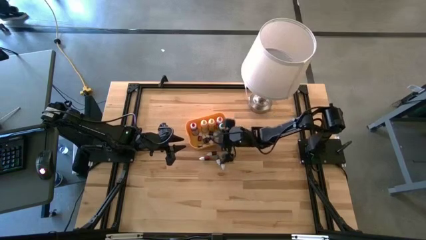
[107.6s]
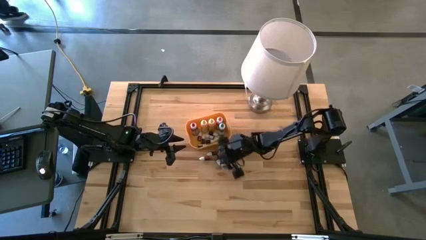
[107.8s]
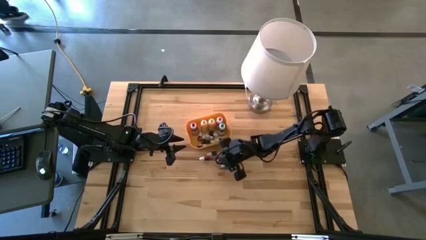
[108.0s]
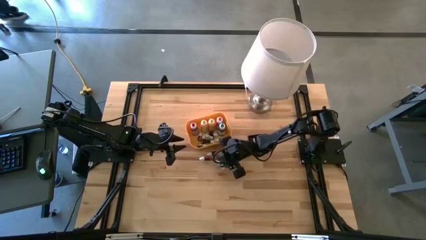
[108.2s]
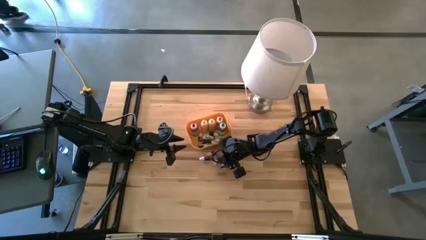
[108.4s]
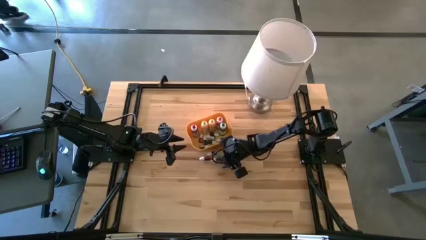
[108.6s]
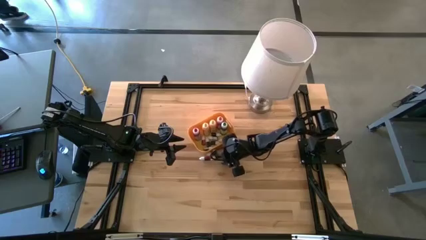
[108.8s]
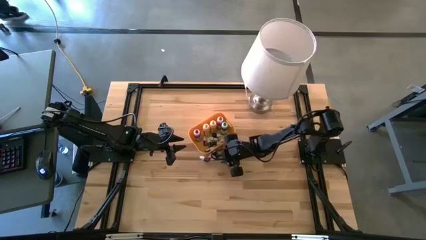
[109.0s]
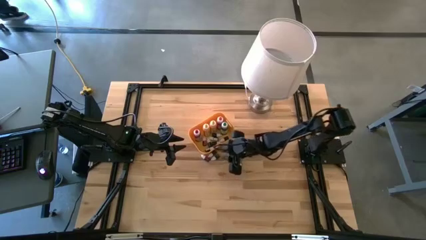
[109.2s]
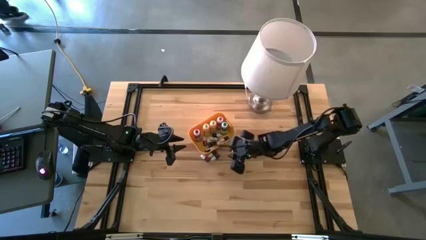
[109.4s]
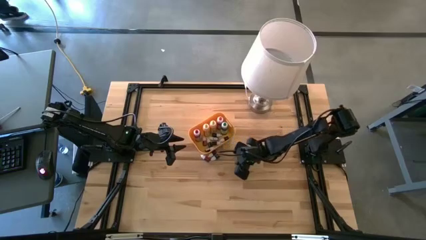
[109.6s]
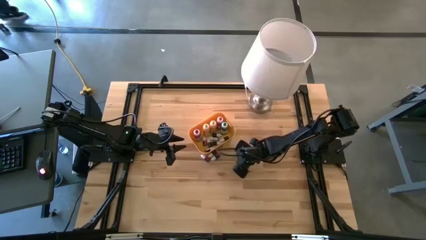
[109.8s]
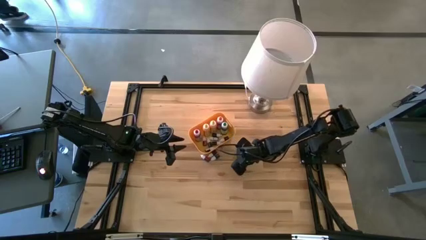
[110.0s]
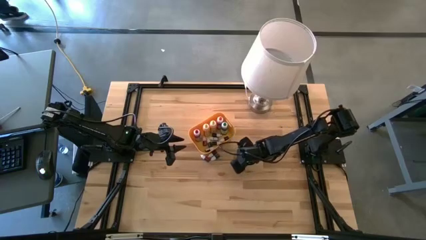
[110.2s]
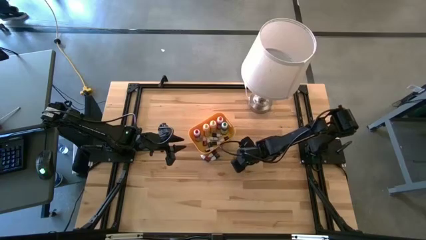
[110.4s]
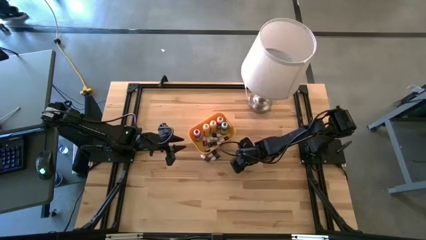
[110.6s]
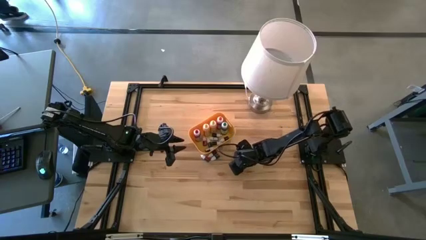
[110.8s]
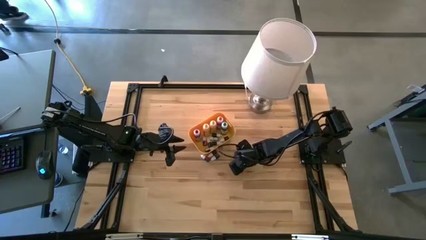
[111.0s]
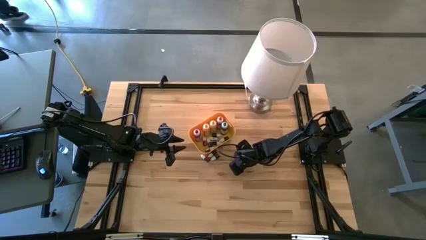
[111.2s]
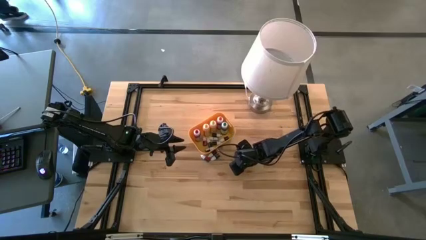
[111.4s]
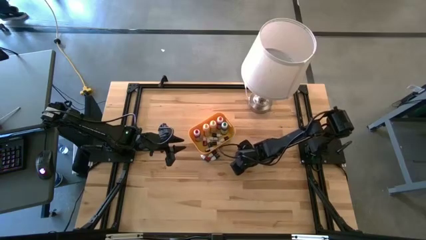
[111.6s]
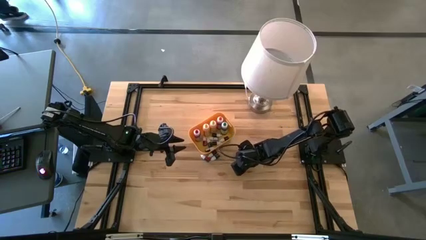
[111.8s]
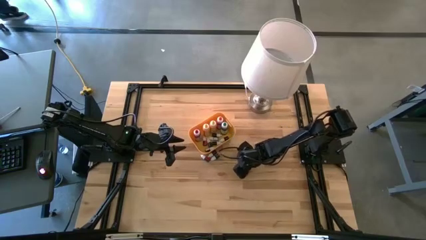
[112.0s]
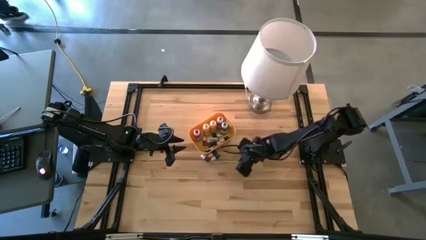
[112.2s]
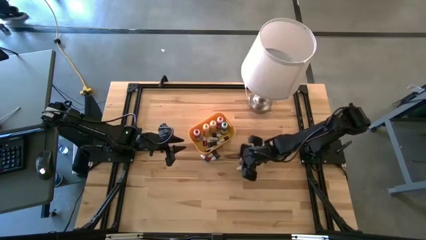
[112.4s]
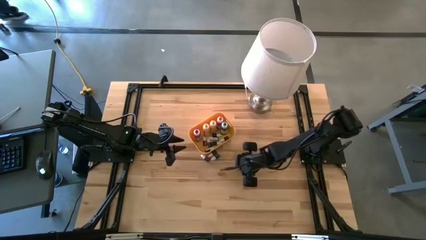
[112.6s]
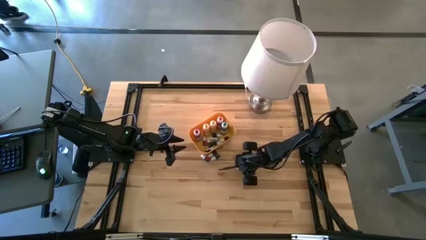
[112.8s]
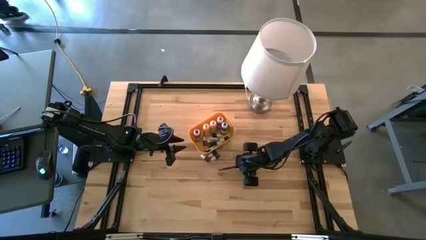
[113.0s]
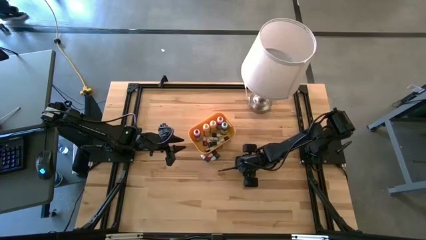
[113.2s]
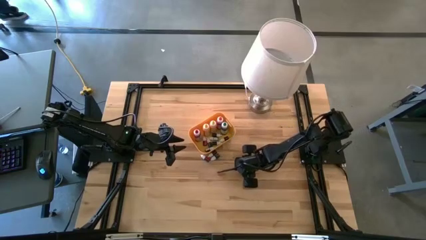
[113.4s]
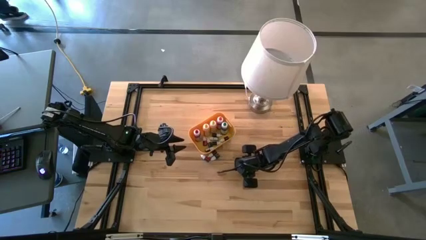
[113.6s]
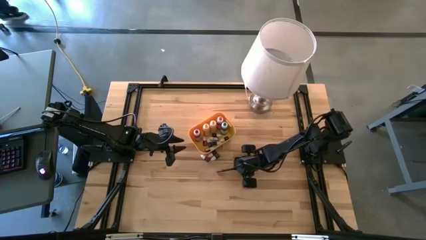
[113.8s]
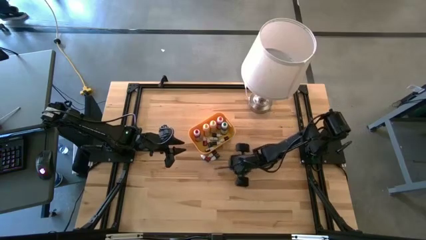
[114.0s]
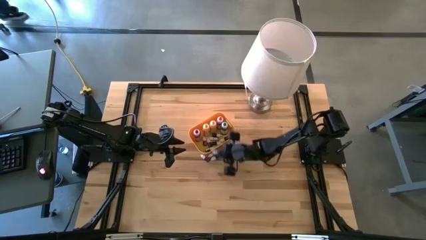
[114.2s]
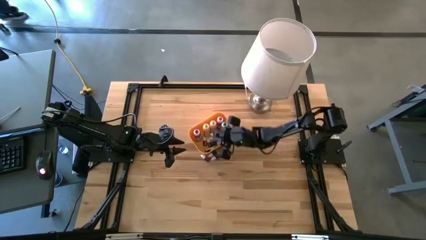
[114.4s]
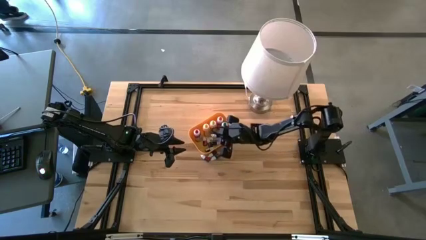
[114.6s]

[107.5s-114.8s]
Task: Pick & Place food coloring
Put the small green food coloring bottle into the yellow bin

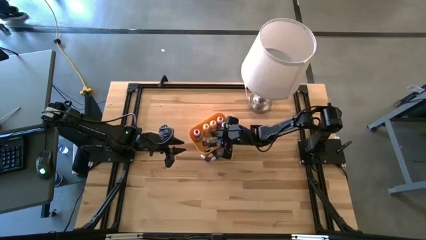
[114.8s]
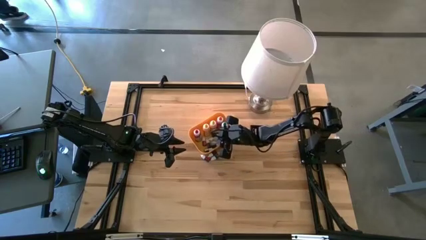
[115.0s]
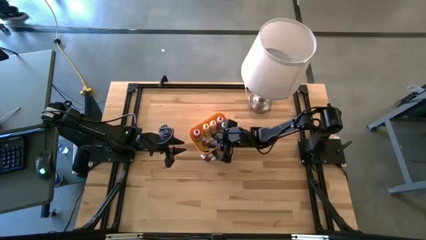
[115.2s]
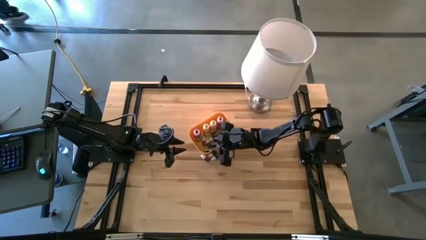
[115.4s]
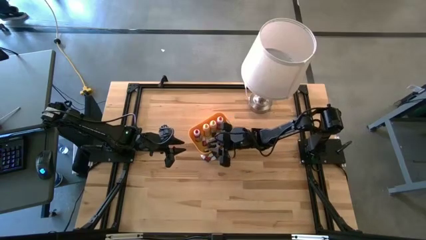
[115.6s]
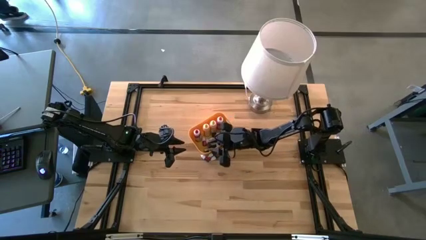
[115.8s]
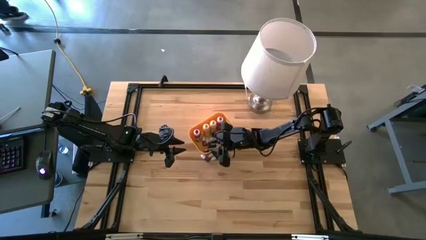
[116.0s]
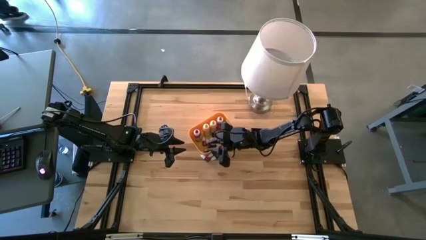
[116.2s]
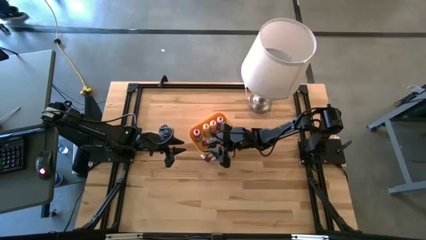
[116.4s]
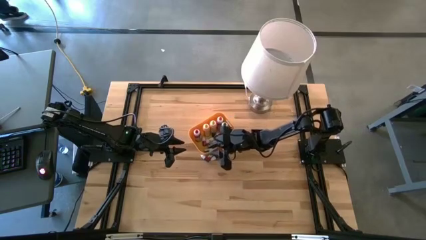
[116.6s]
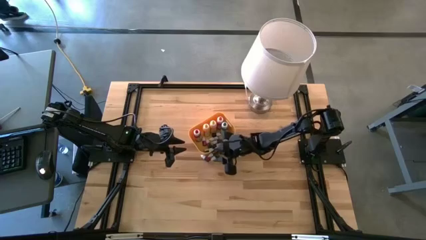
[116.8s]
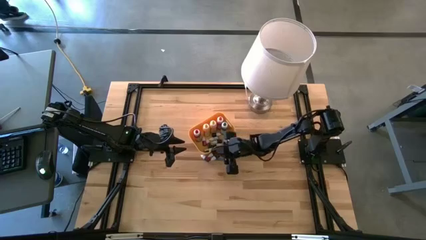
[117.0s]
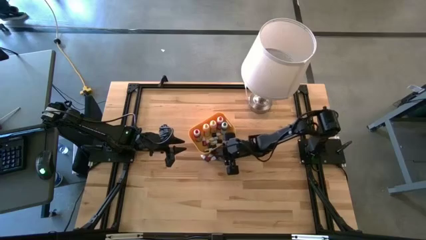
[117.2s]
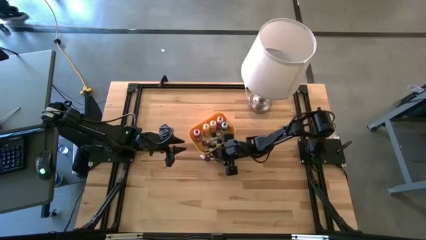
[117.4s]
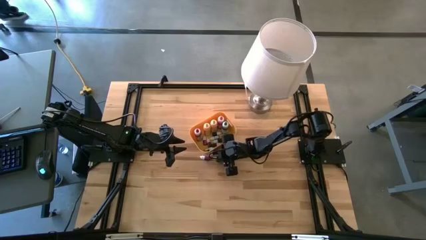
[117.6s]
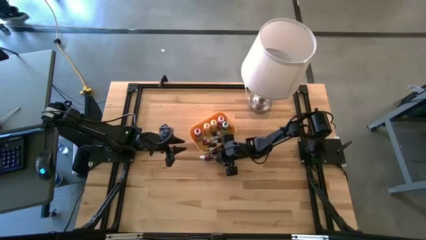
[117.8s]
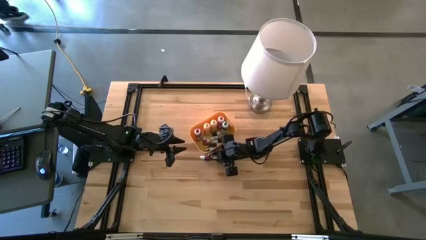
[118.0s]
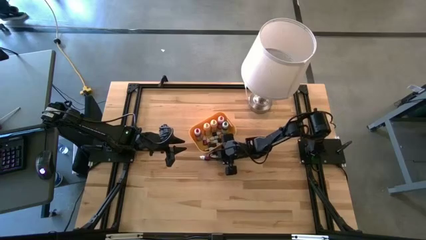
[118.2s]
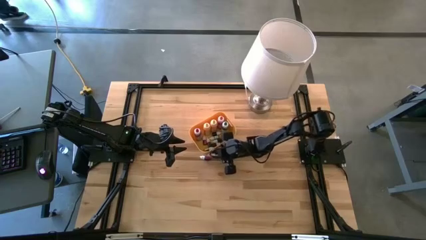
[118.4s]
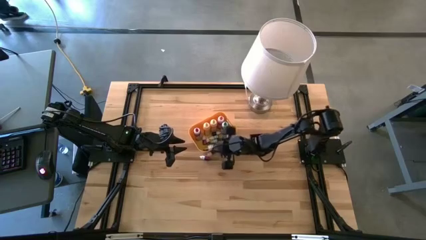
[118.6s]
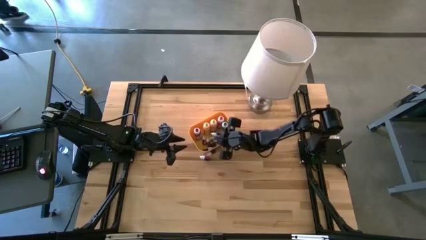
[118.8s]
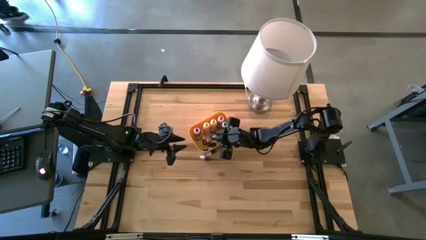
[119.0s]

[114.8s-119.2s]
Put the small green food coloring bottle into the yellow bin

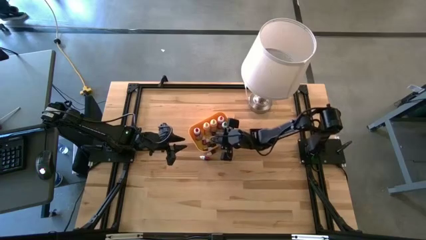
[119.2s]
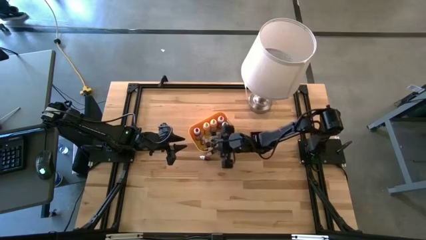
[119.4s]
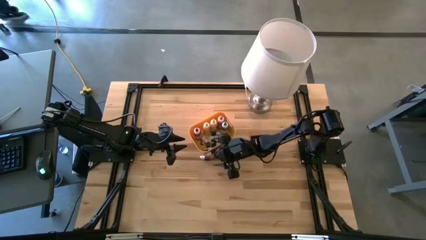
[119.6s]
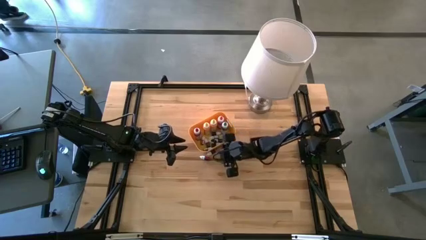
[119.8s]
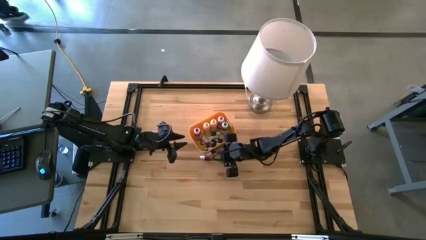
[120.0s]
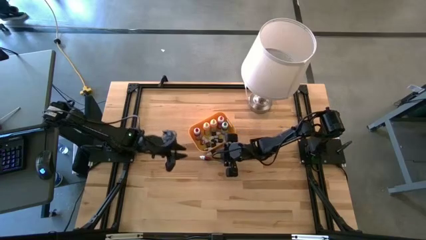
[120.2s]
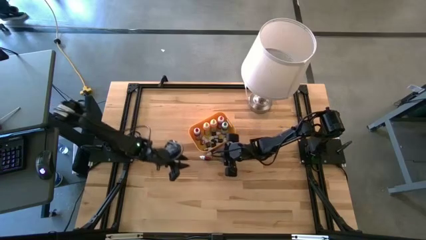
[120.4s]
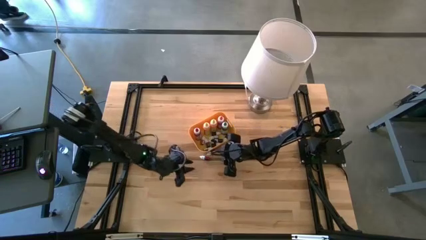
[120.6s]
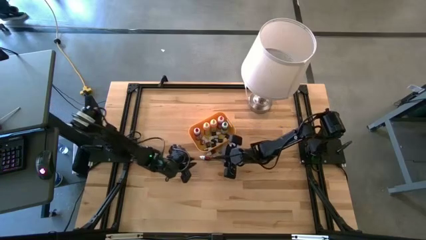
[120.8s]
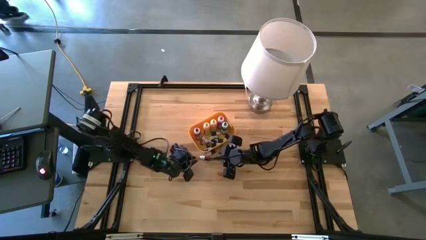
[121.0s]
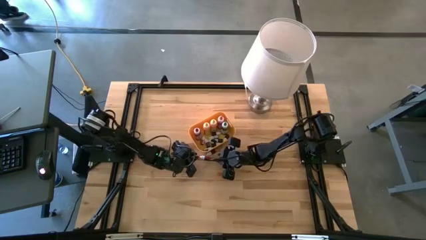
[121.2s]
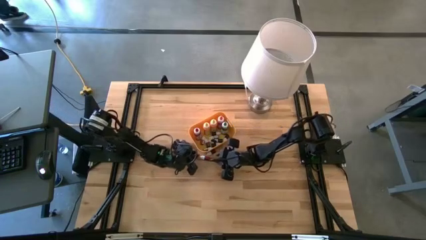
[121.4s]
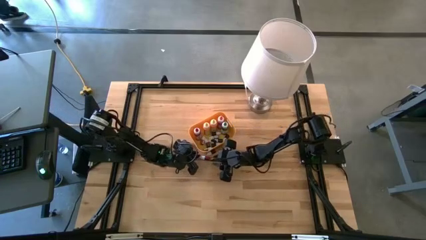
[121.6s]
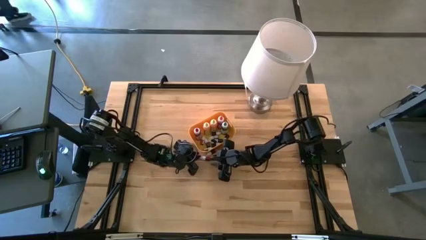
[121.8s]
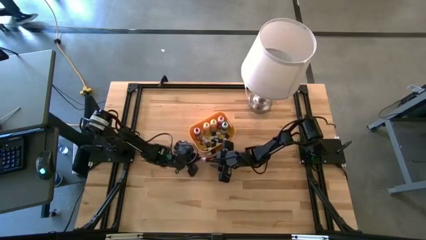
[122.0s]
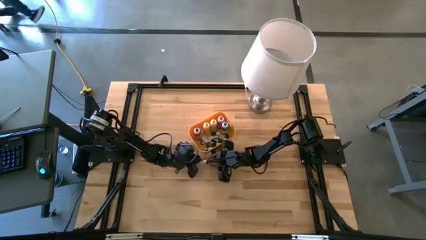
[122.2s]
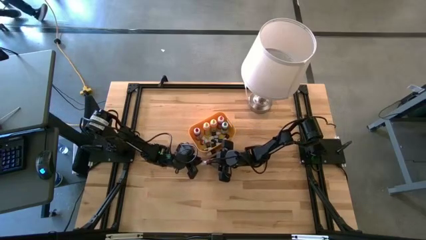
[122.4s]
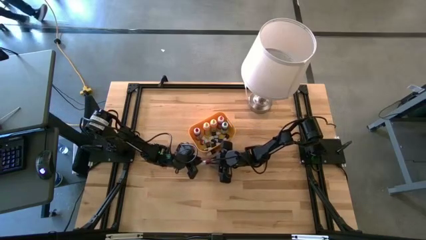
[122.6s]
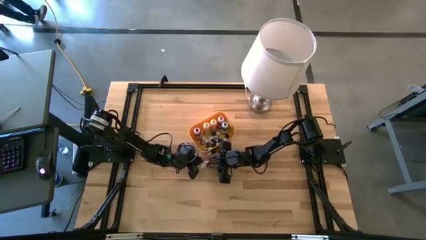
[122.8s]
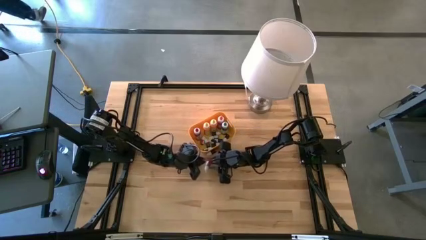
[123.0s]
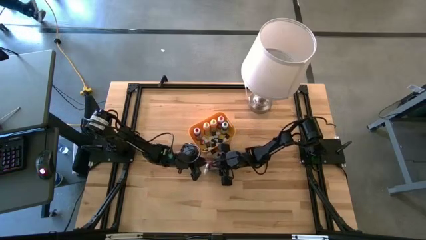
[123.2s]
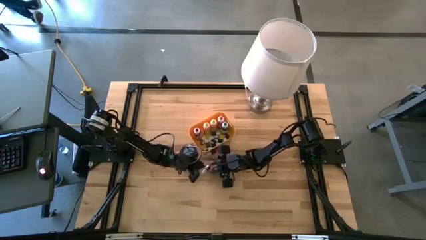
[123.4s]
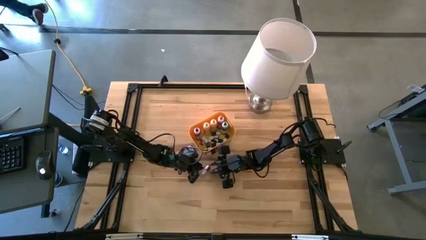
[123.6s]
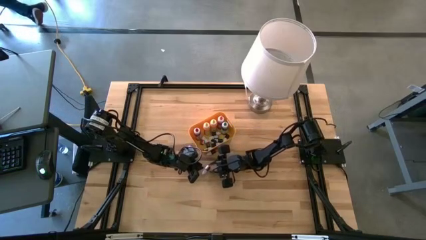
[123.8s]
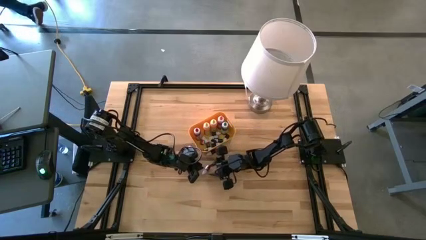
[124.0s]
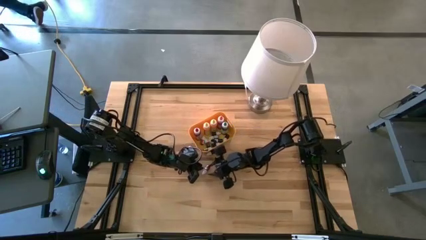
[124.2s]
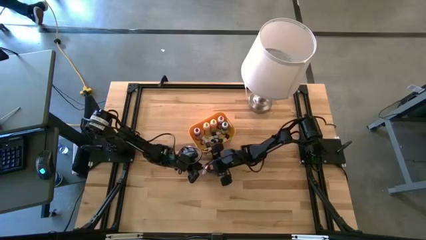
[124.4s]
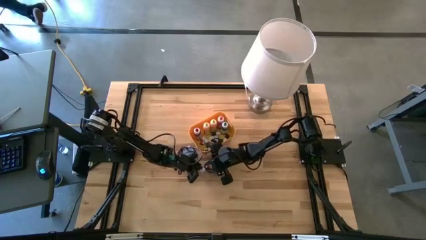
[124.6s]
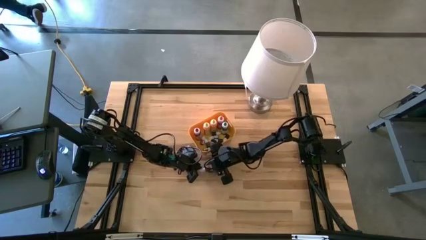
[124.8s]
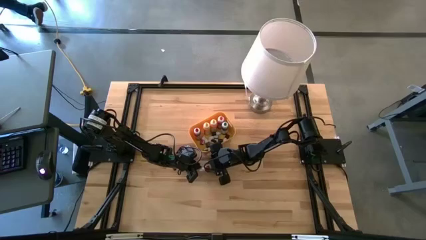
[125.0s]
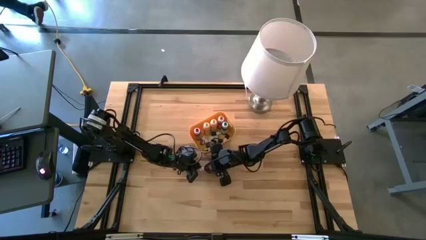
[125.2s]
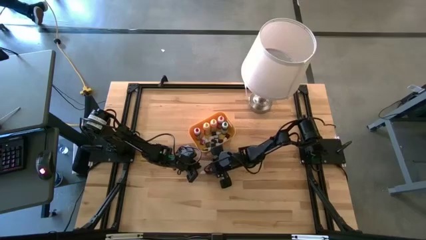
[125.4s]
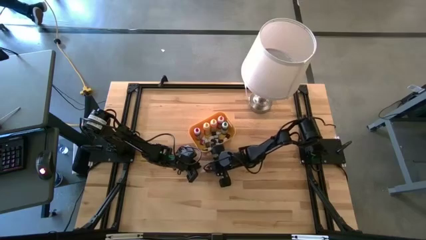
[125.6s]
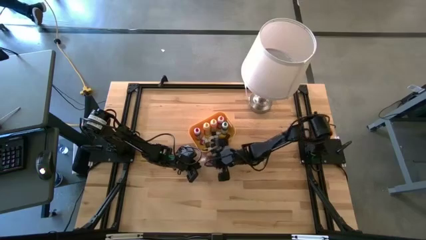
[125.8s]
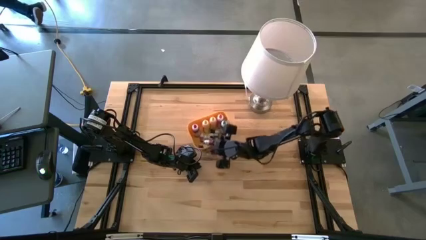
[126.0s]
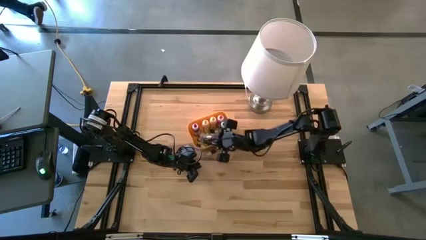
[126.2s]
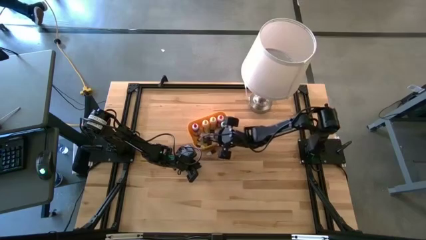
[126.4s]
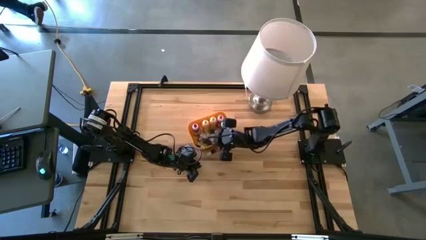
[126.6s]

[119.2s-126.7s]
Put the small red food coloring bottle into the yellow bin
